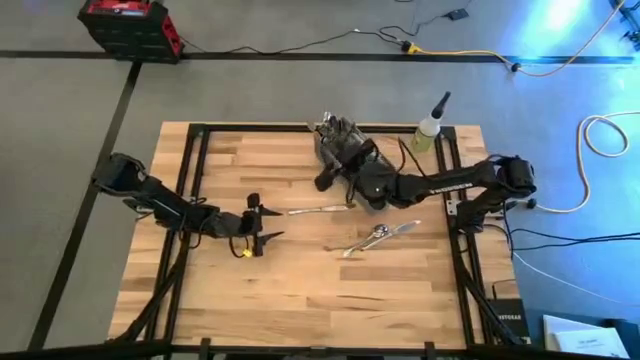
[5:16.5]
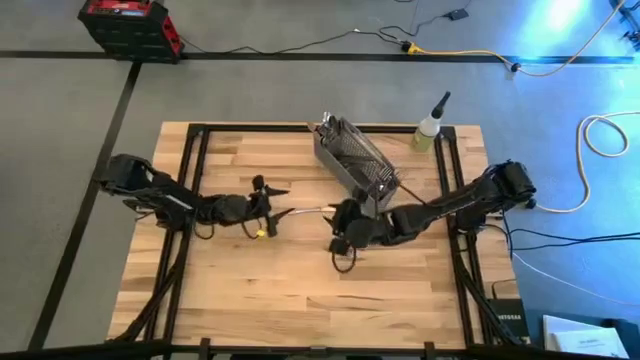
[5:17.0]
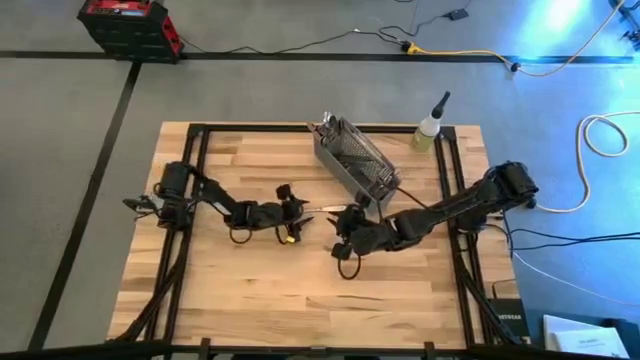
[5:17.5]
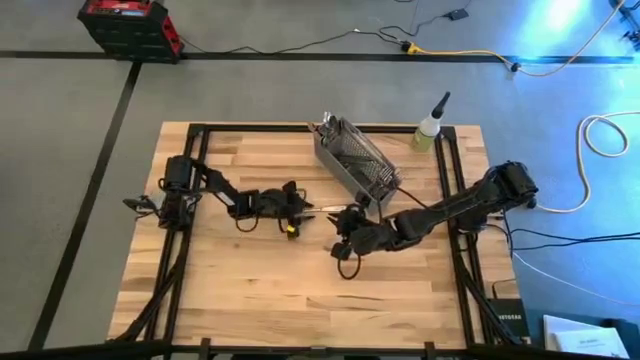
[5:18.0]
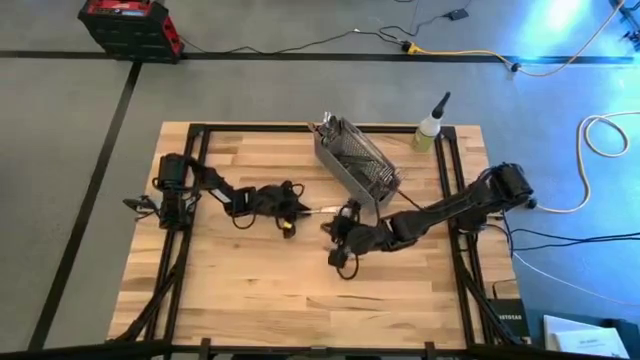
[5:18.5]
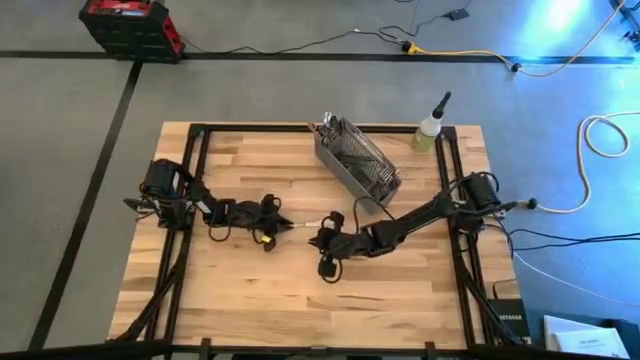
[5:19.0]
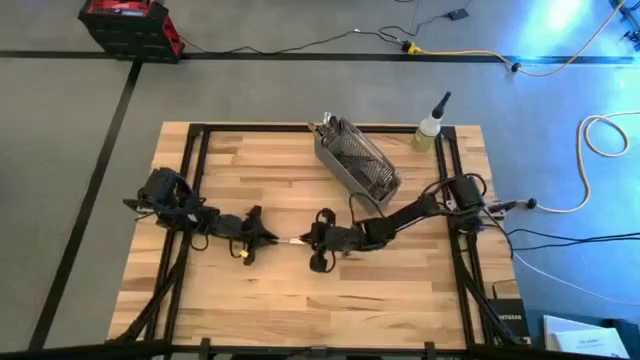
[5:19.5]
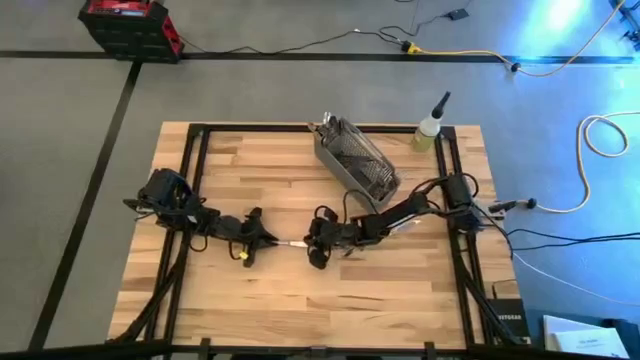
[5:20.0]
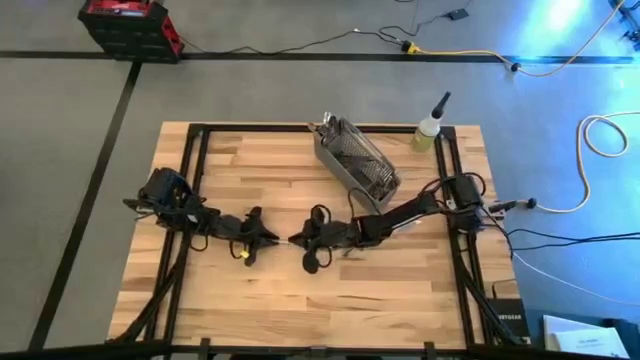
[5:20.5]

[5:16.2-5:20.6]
Task: Sort silverware
Put the silver knife into the gray silverware organizer

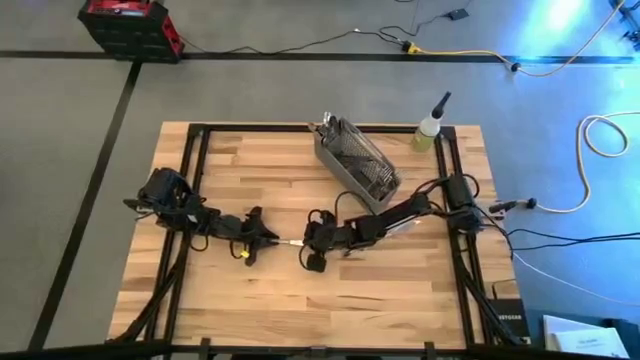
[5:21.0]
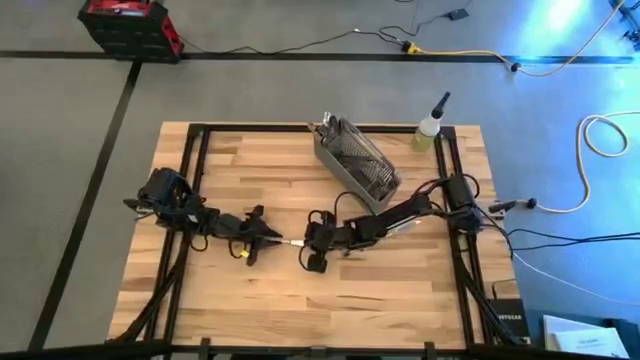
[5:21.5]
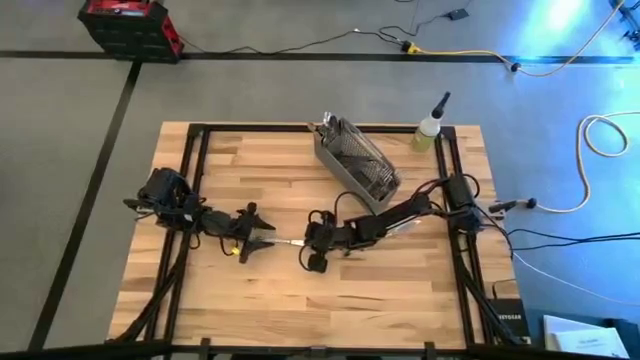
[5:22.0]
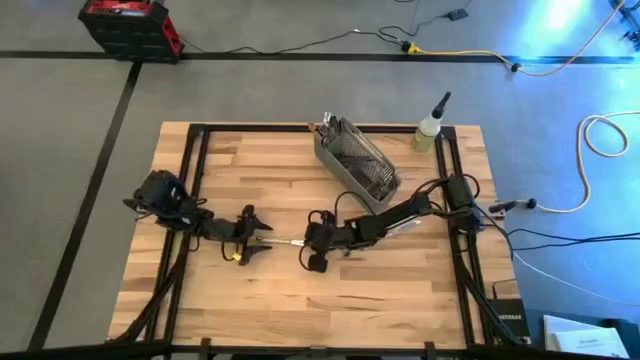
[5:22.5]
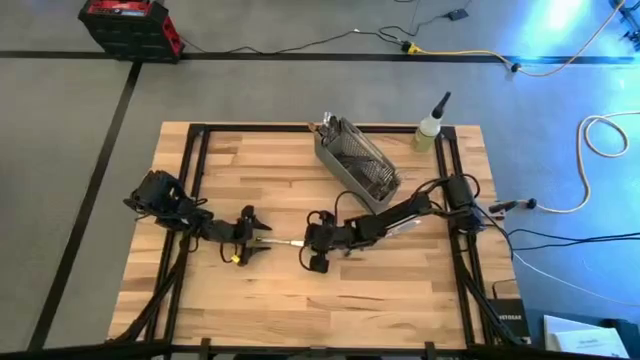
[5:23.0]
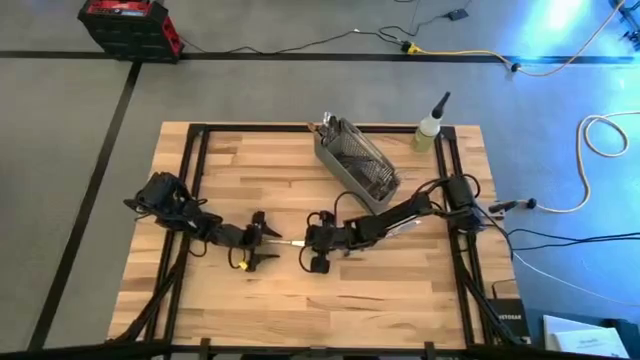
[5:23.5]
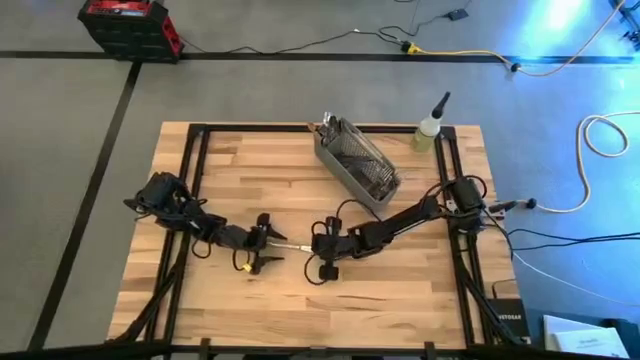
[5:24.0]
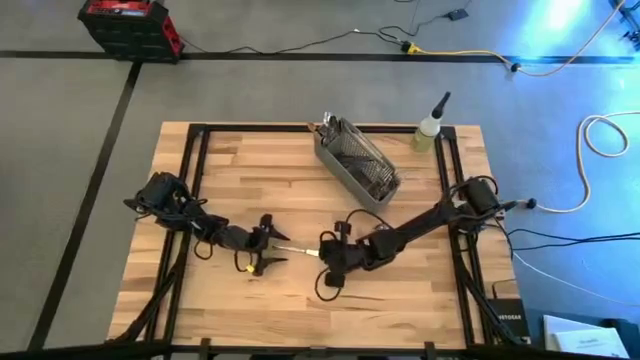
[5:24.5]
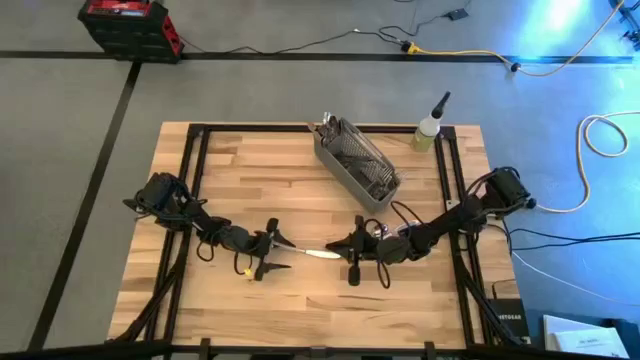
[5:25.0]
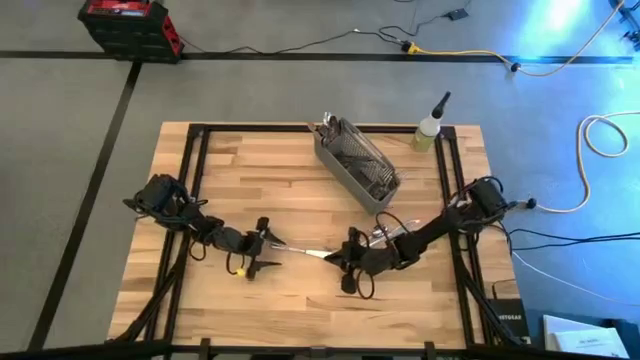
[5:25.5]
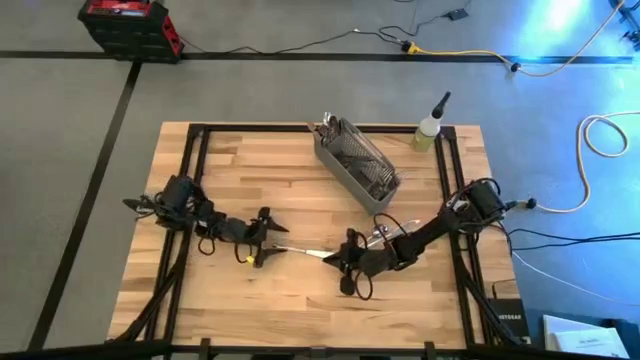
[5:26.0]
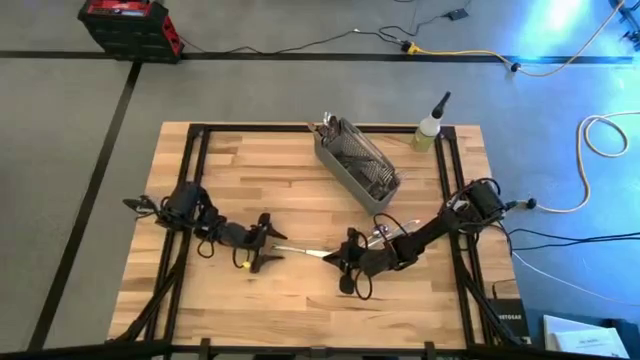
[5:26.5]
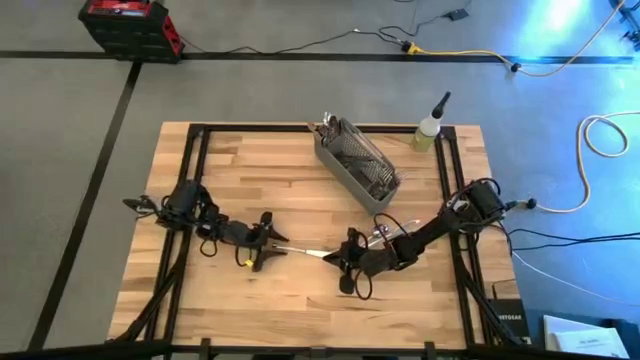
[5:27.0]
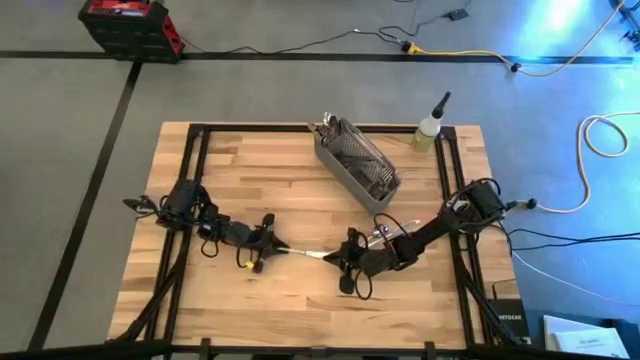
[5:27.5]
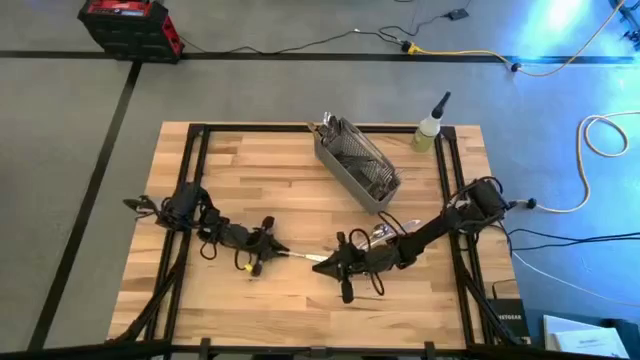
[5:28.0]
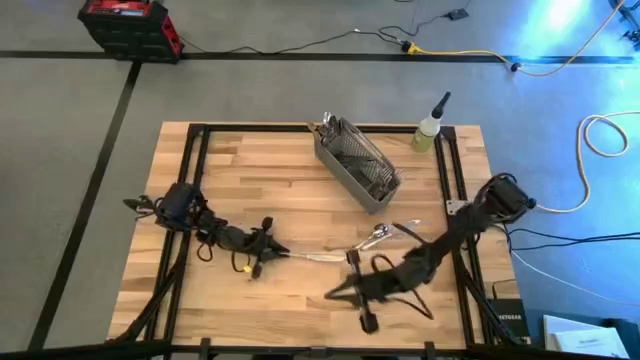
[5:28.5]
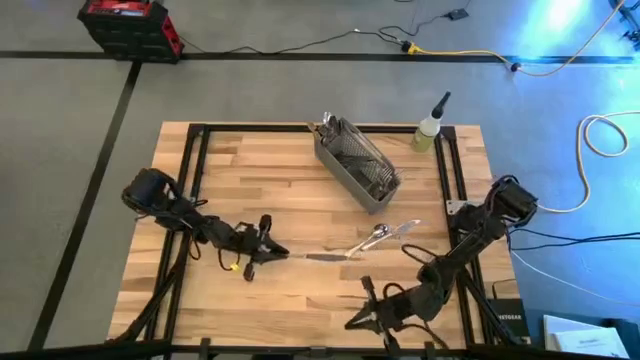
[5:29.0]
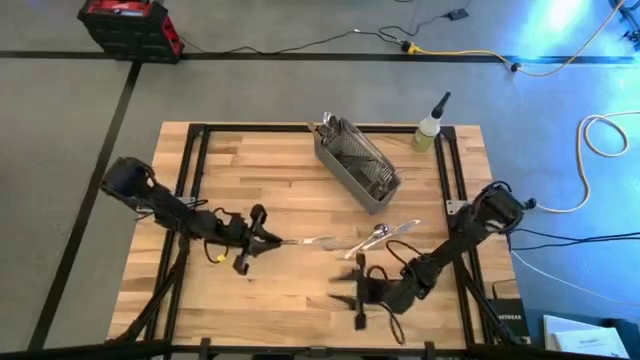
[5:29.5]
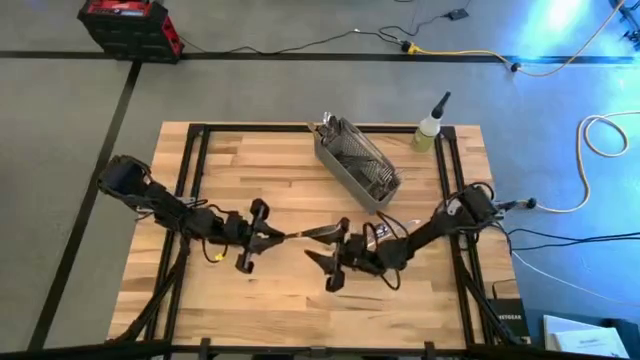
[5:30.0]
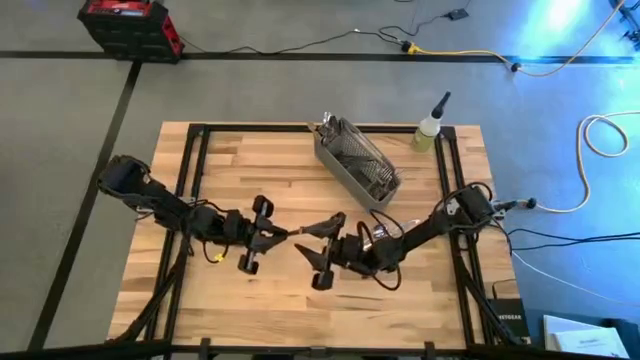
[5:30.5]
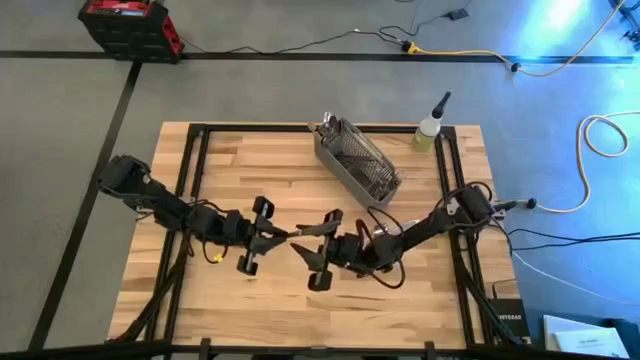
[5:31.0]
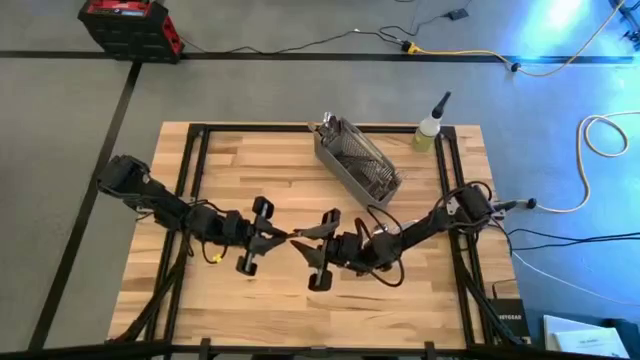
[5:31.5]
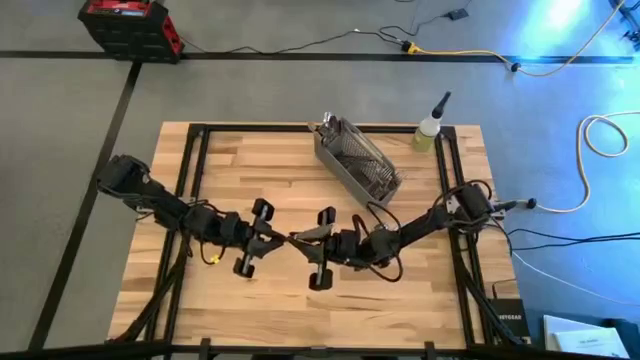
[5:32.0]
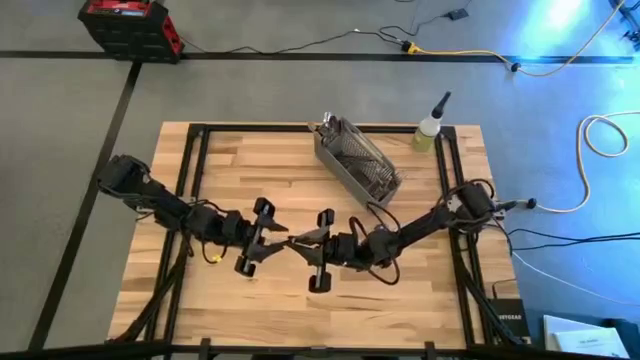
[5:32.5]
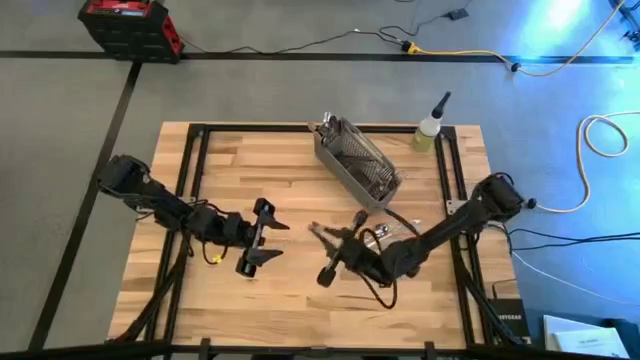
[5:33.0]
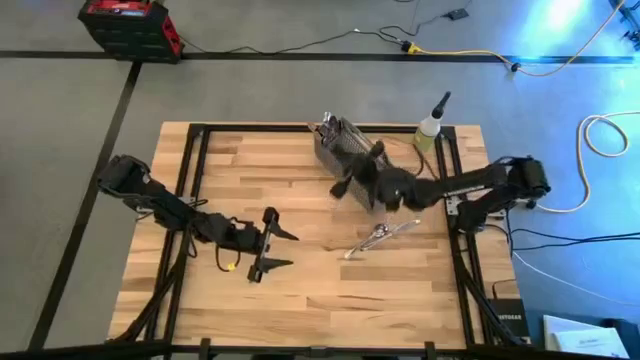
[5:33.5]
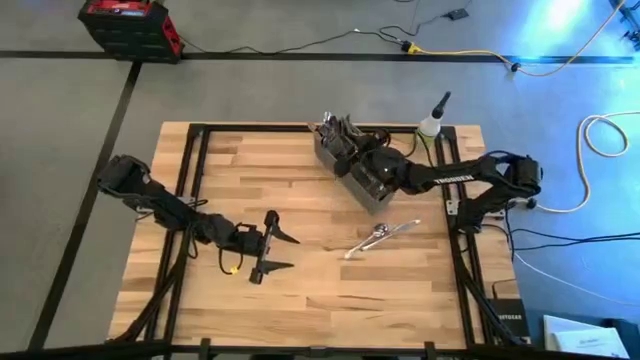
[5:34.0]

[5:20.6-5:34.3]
Put the silver knife into the gray silverware organizer

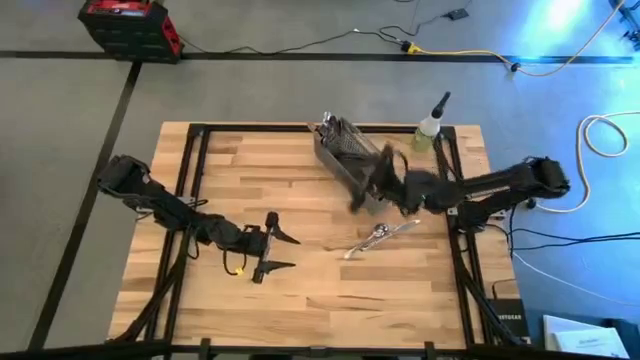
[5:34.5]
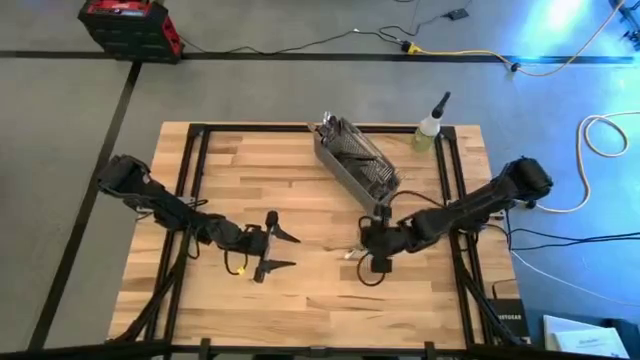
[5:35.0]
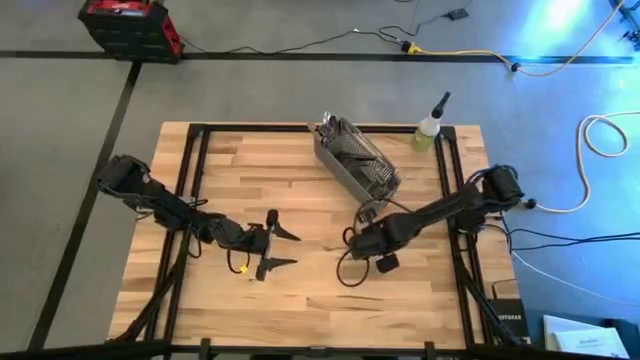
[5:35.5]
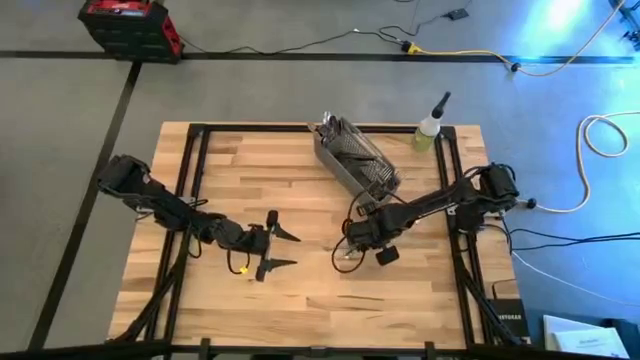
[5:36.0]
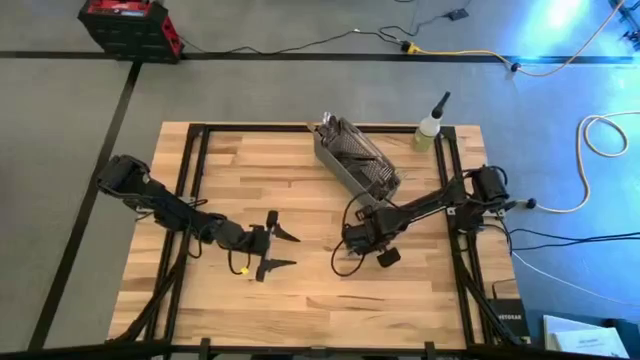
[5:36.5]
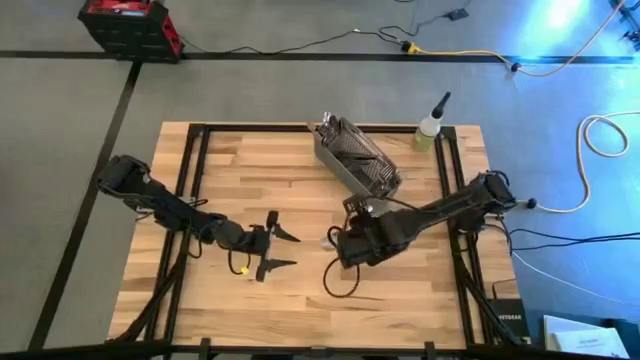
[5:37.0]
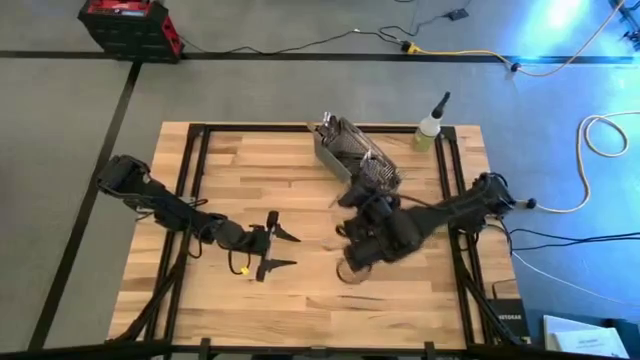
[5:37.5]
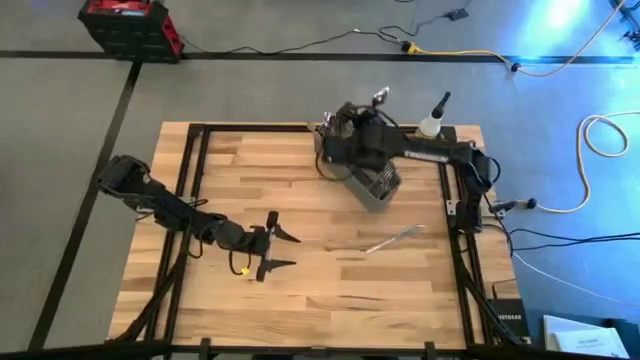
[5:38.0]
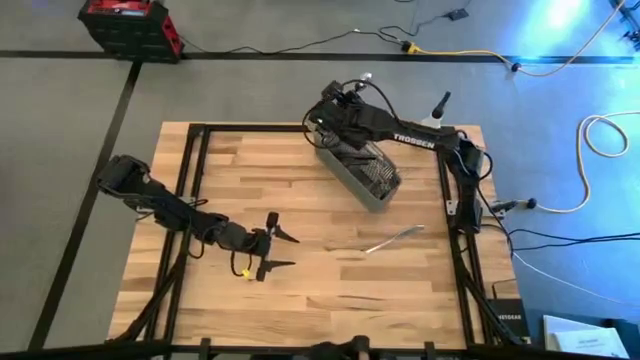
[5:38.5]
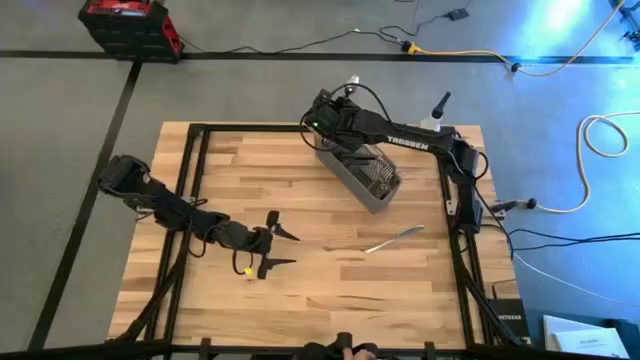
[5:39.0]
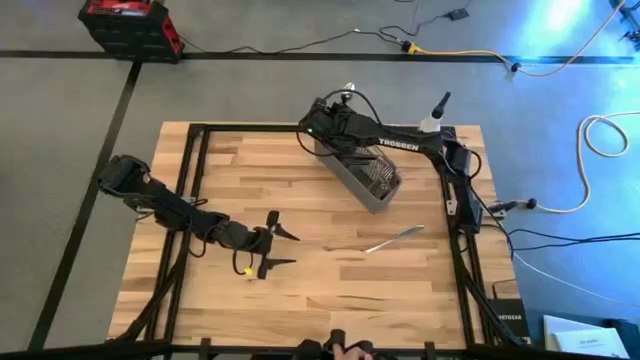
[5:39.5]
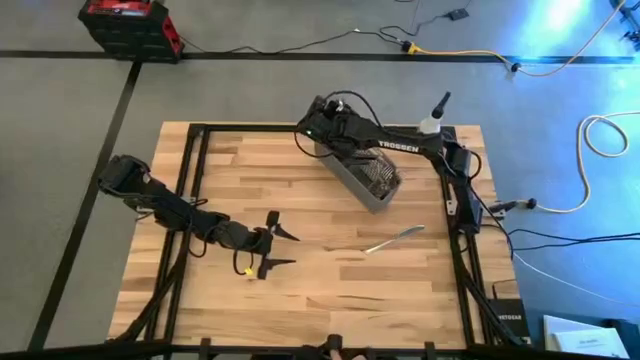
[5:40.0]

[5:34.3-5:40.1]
Put the silver spoon into the gray silverware organizer
